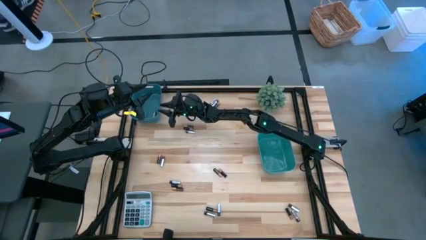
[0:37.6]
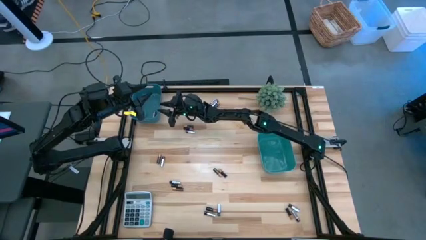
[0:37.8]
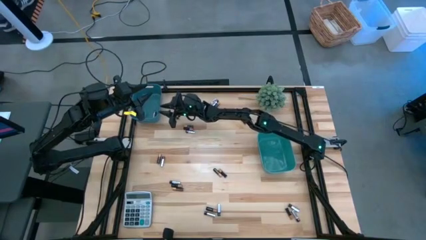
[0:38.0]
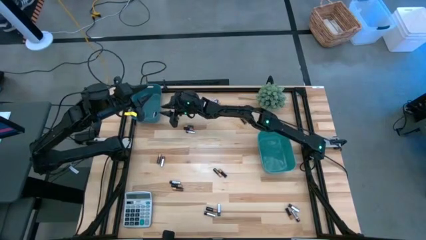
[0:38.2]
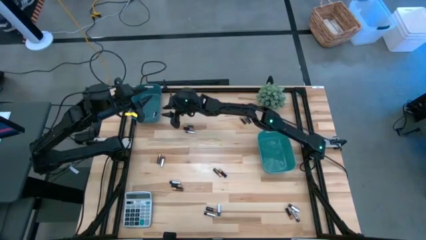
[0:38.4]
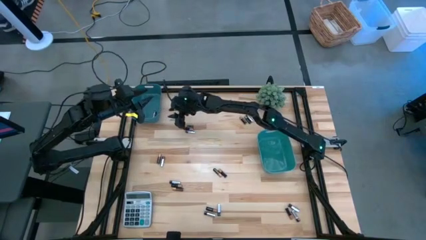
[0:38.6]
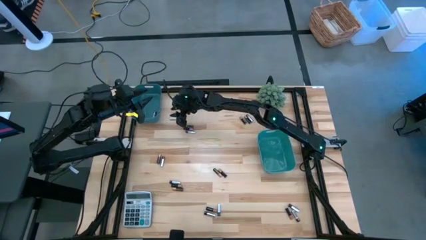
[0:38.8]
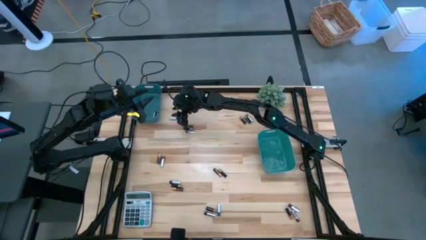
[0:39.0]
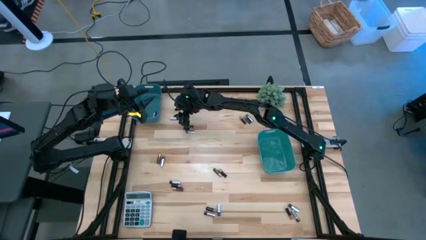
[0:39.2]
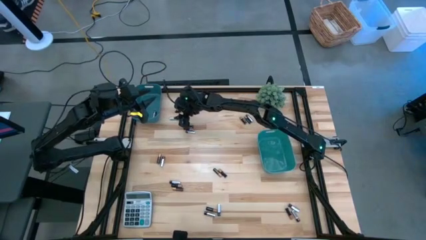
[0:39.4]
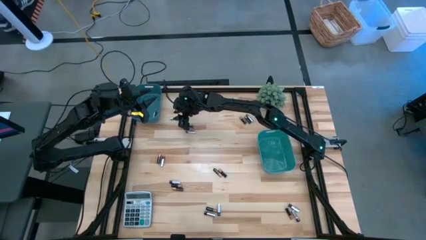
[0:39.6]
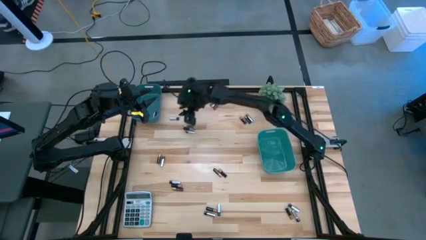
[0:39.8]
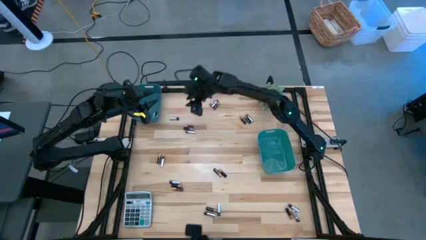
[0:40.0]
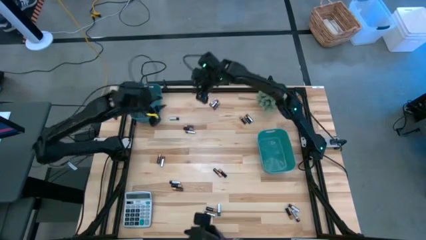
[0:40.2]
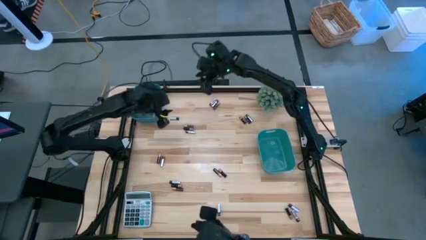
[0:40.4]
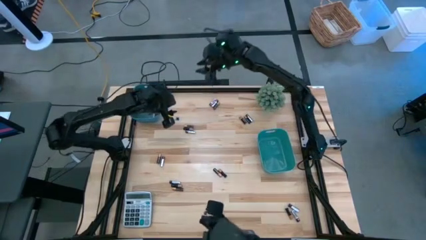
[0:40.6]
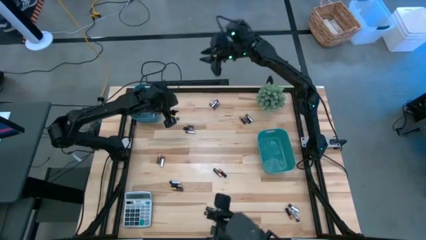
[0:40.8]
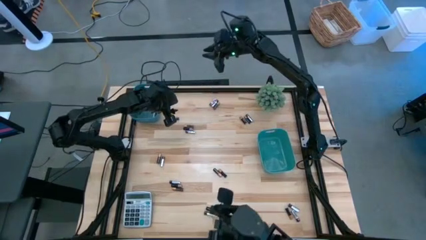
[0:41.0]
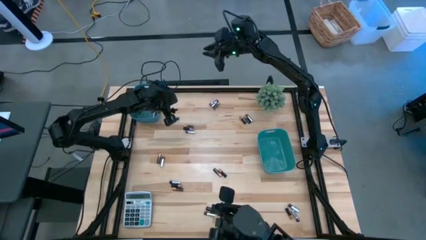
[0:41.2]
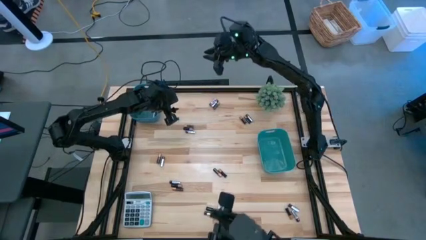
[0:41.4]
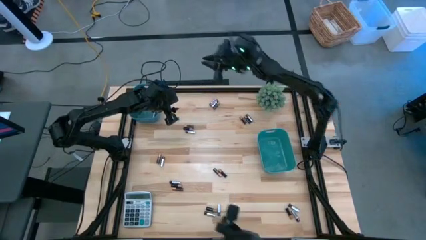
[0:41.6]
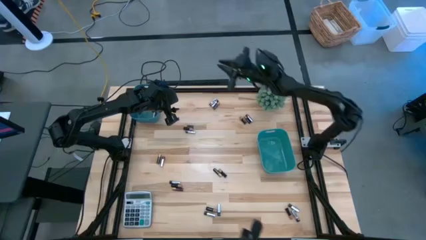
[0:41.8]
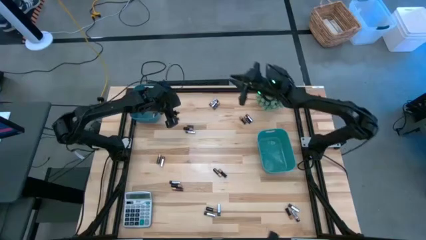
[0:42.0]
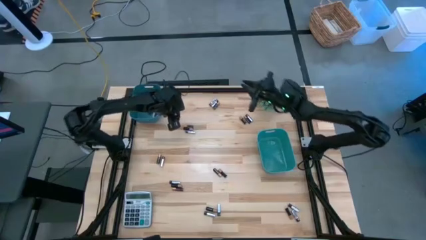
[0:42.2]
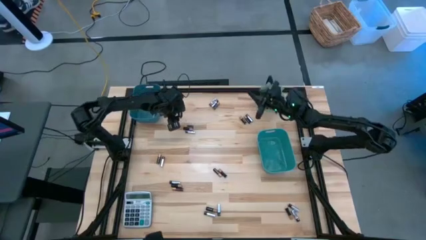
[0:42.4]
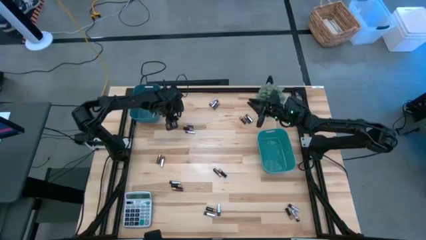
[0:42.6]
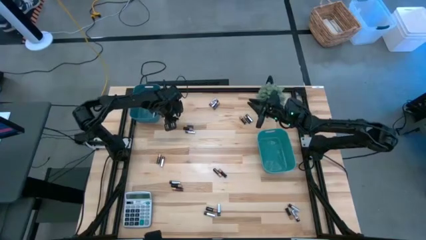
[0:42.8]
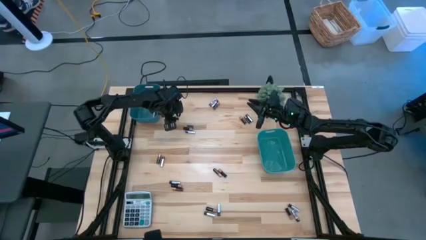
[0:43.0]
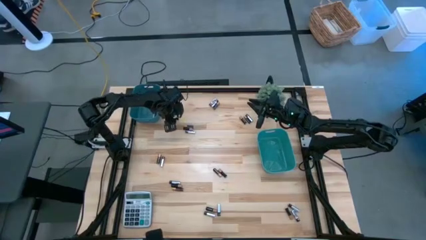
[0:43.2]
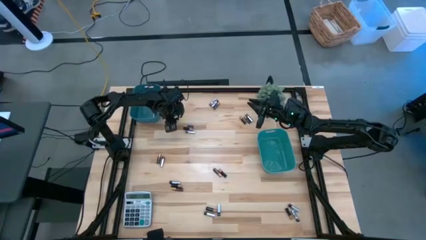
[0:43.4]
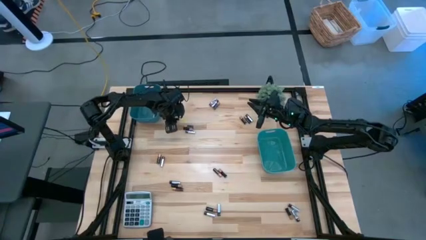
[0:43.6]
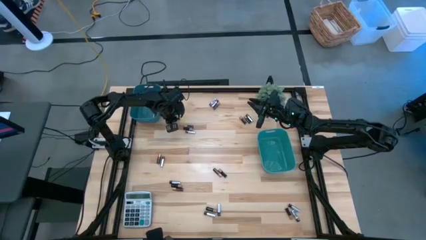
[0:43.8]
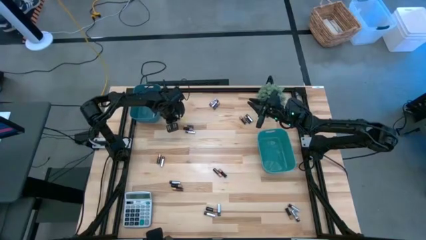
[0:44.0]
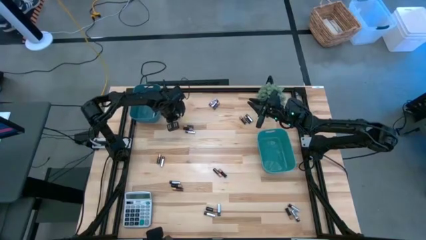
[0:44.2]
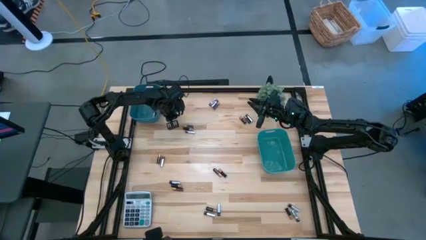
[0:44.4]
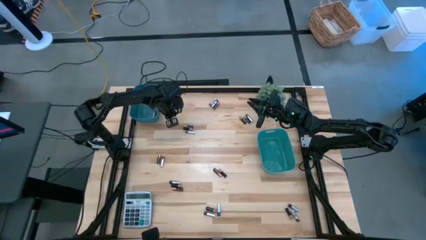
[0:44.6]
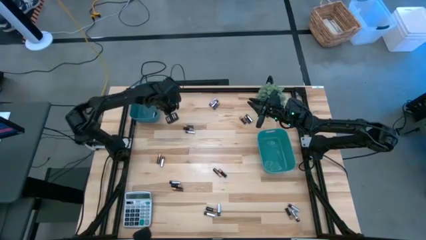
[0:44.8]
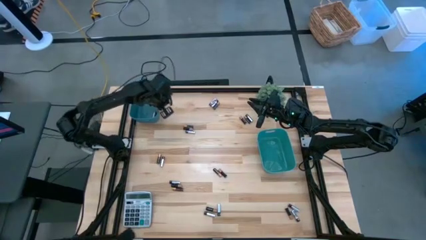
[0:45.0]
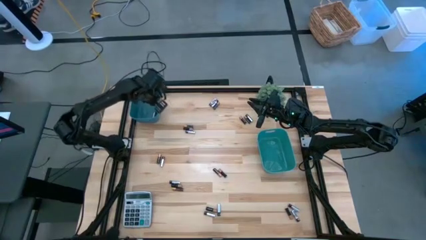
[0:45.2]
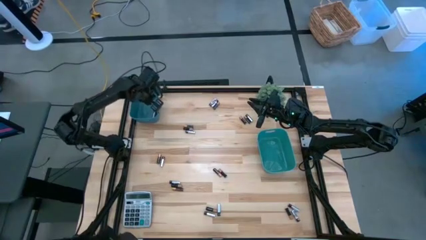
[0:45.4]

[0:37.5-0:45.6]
Task: Sort batteries
Put the silver battery into the blue bin
